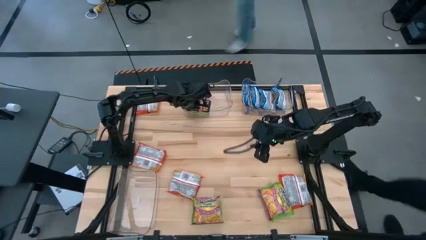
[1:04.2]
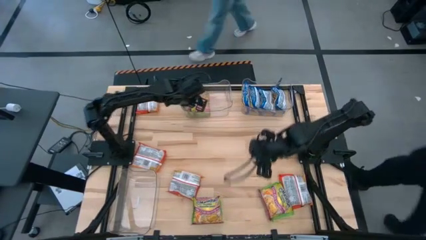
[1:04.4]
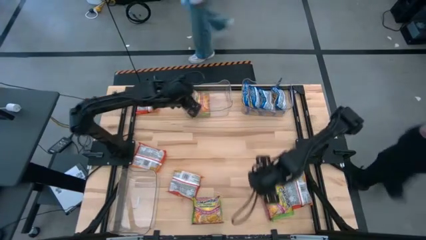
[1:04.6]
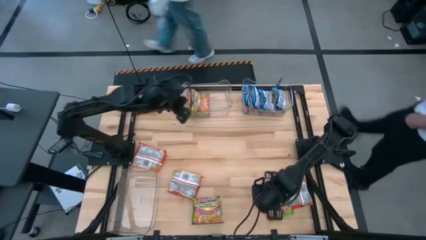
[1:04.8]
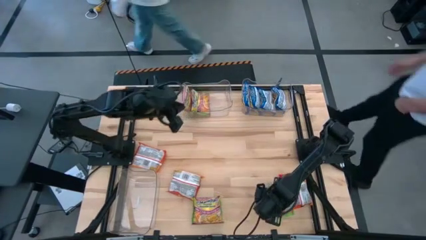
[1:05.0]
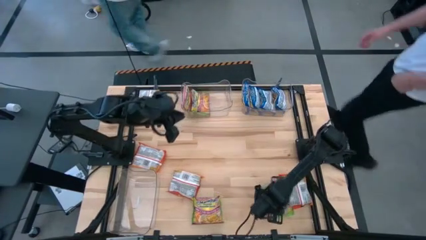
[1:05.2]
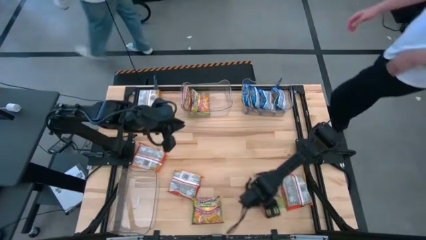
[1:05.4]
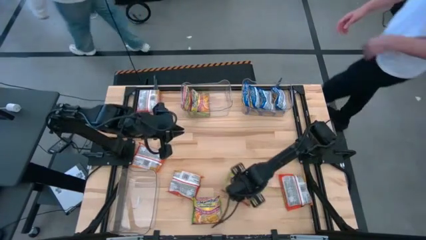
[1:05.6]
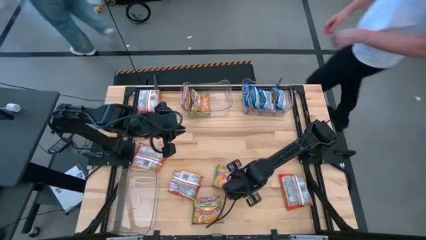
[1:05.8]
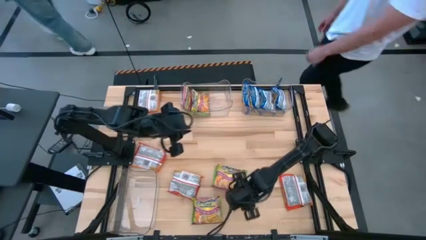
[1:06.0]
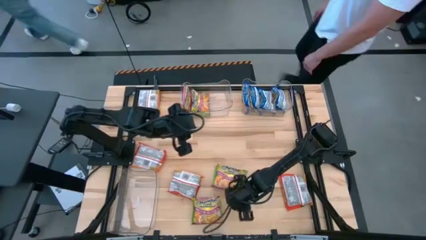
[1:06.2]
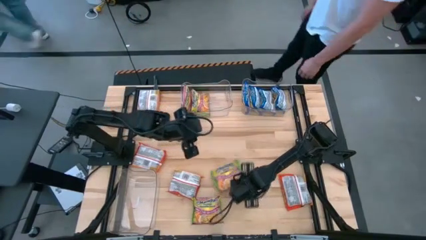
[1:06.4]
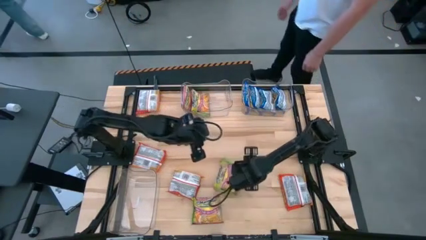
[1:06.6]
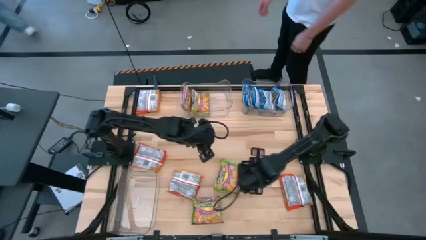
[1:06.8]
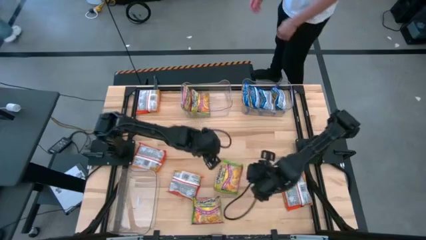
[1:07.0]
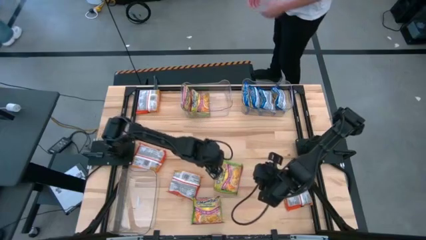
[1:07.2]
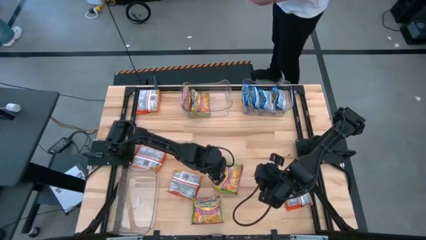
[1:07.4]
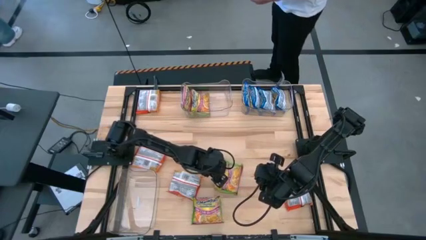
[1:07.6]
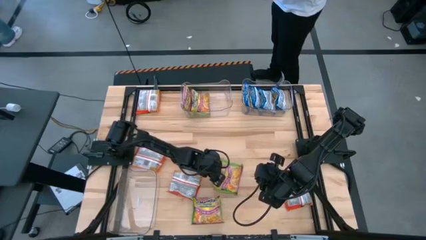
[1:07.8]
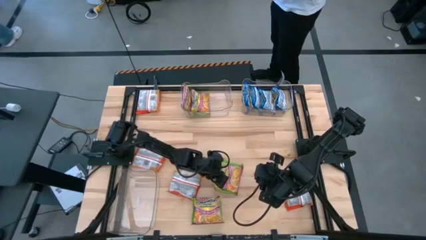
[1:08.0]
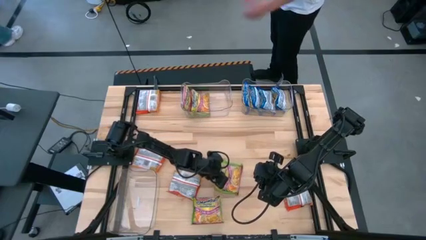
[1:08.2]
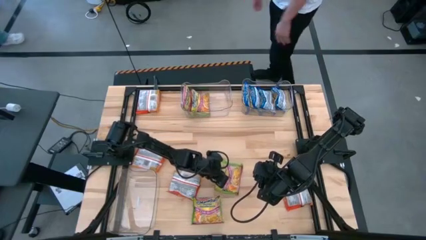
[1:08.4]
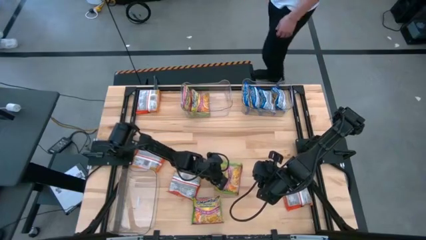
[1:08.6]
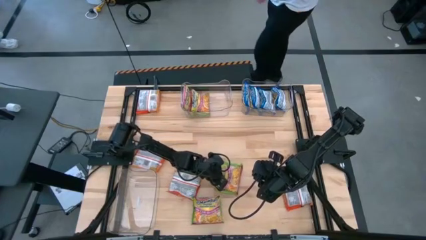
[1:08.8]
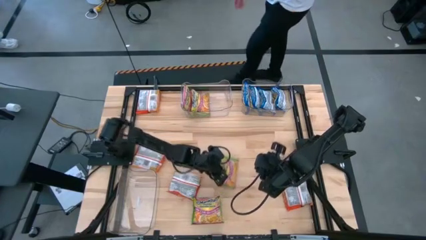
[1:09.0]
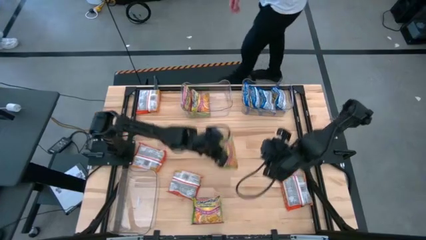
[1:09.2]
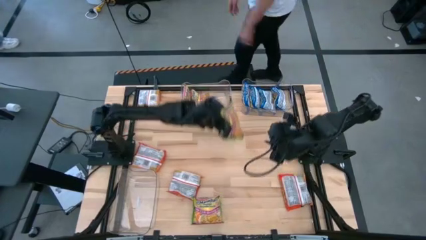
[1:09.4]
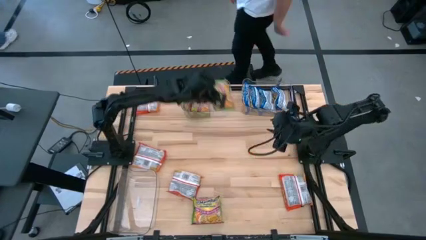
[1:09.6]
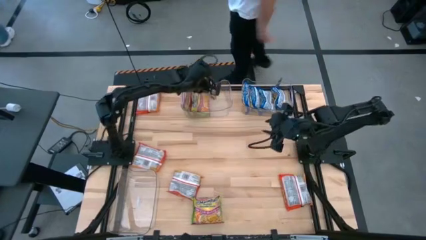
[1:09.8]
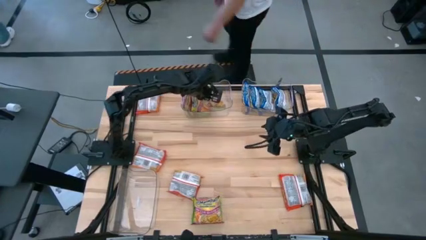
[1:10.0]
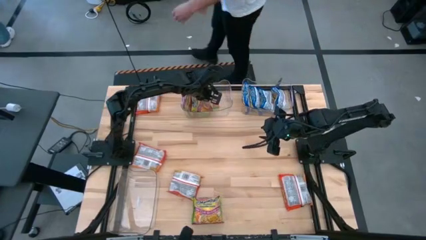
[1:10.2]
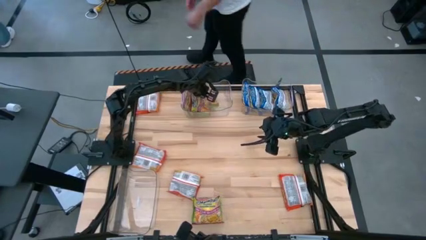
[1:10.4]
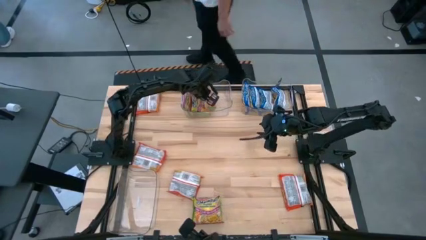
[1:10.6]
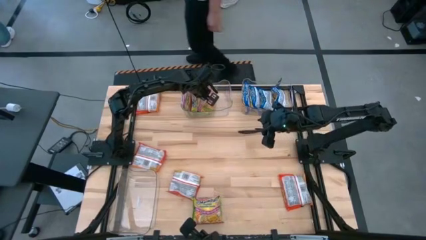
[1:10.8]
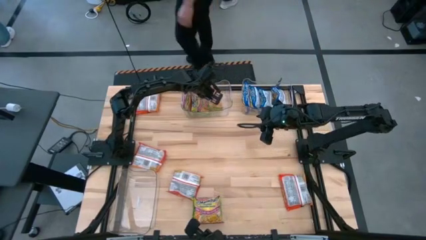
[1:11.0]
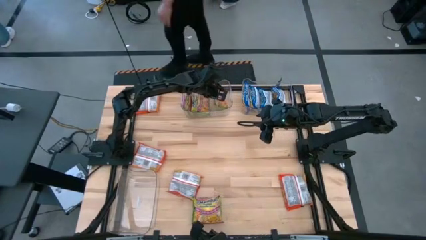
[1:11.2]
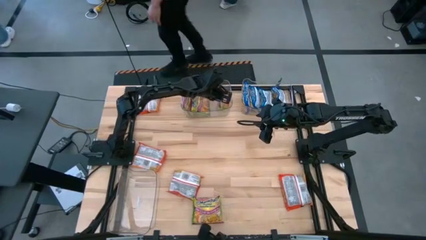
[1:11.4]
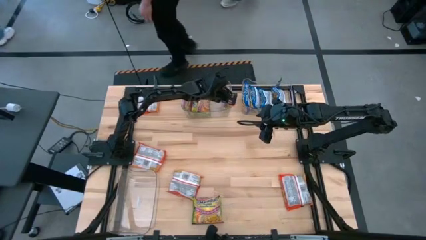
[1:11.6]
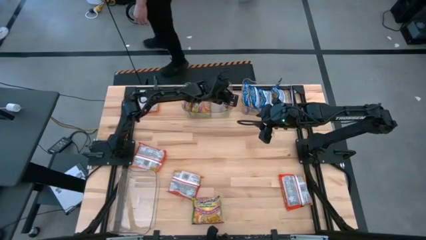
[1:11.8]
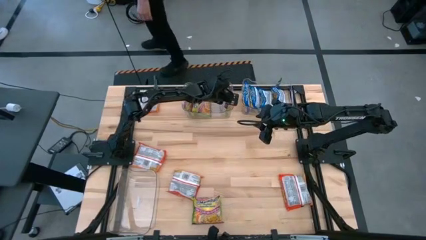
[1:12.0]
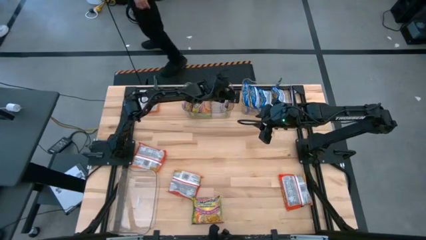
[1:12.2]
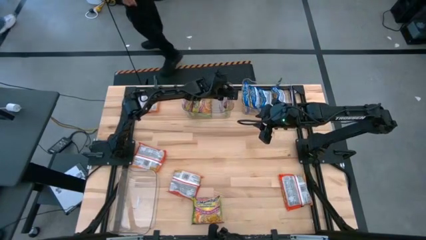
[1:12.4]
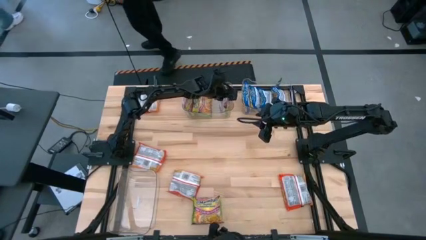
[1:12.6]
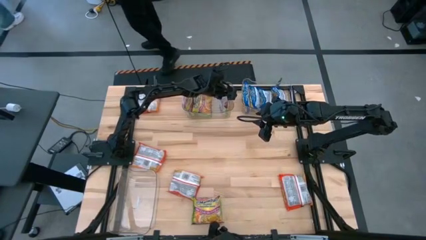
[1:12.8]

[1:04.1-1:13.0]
Task: Sort Maruchan noodles
Put the green noodle pack into the top left transparent bin

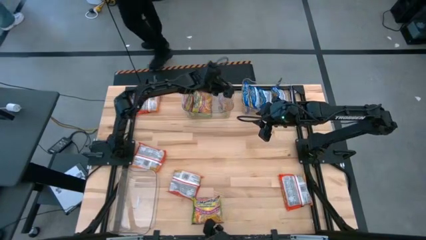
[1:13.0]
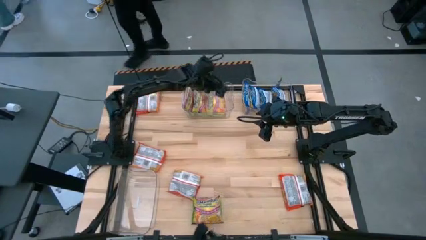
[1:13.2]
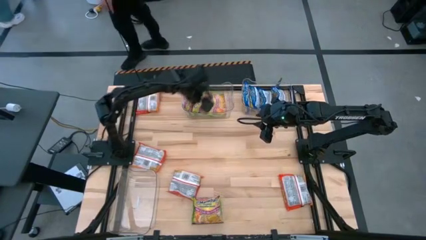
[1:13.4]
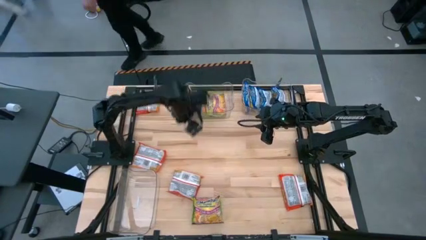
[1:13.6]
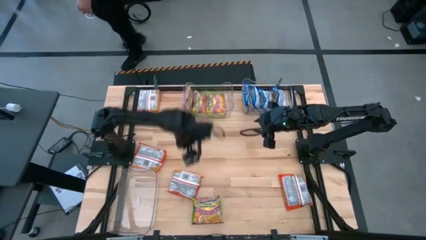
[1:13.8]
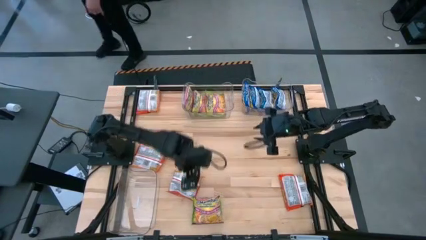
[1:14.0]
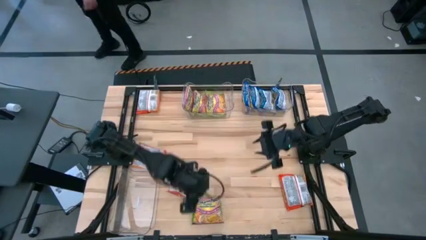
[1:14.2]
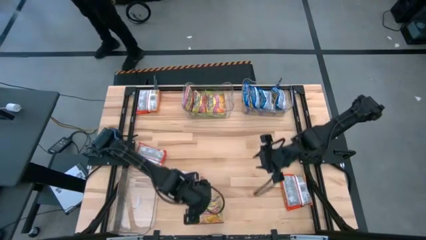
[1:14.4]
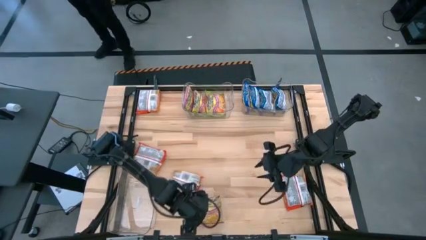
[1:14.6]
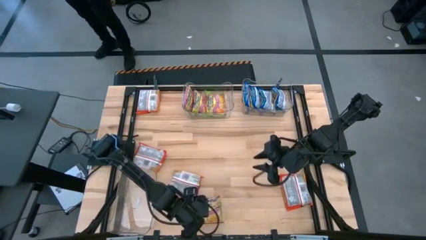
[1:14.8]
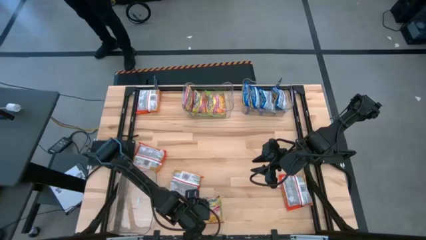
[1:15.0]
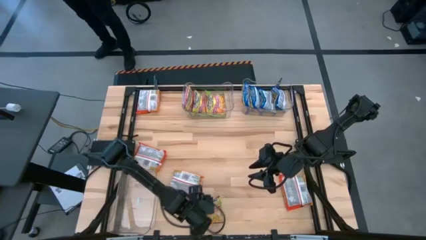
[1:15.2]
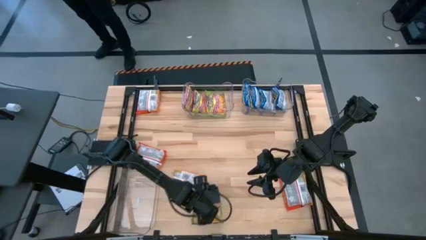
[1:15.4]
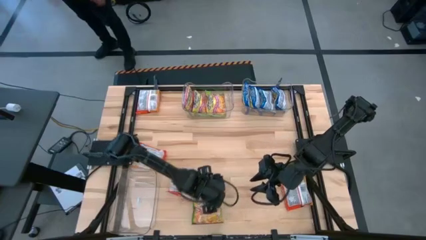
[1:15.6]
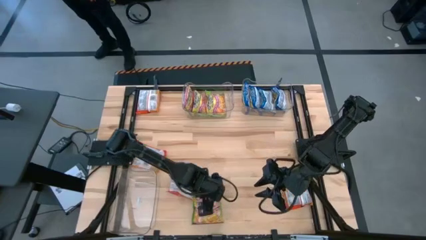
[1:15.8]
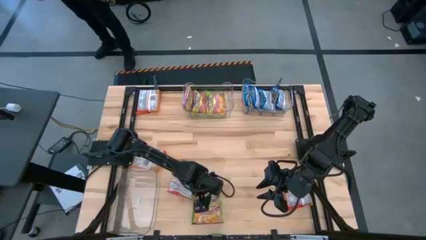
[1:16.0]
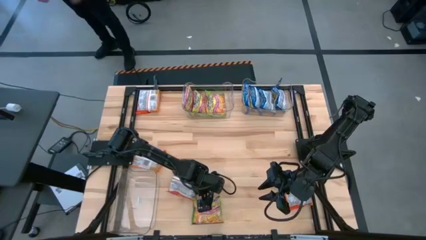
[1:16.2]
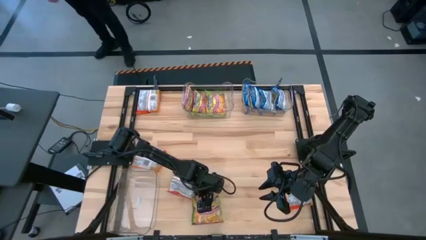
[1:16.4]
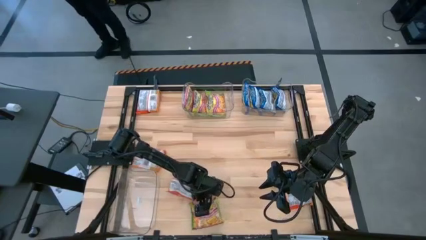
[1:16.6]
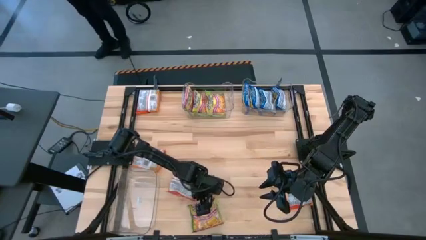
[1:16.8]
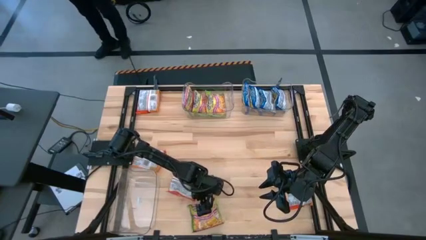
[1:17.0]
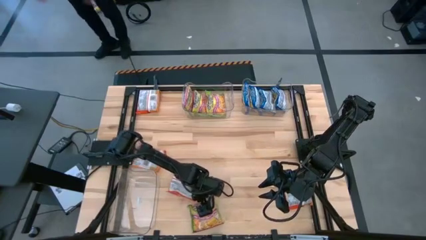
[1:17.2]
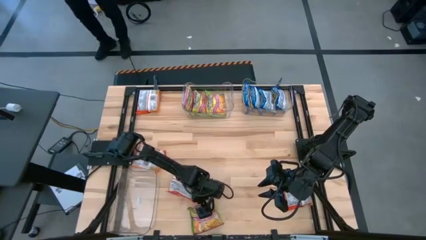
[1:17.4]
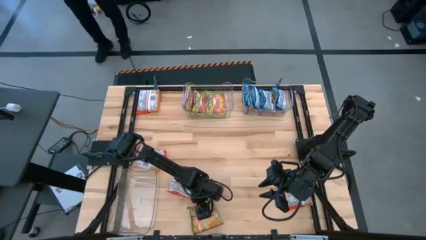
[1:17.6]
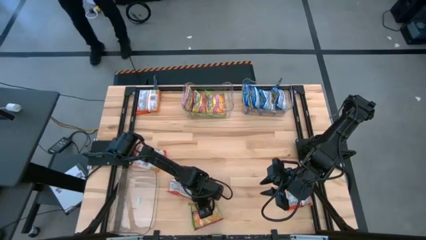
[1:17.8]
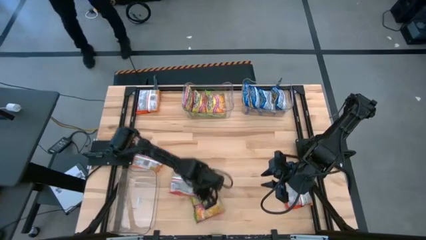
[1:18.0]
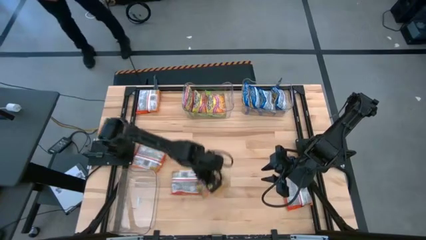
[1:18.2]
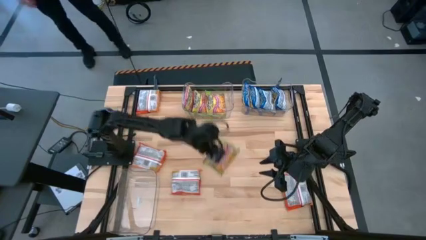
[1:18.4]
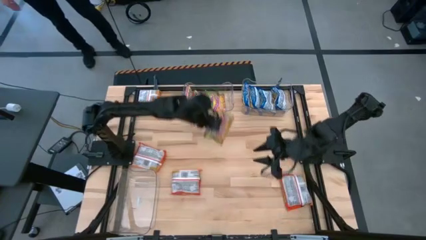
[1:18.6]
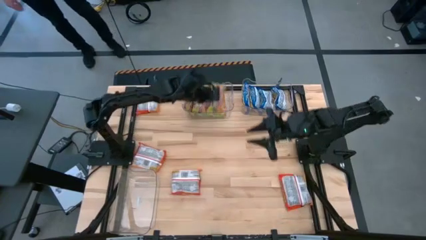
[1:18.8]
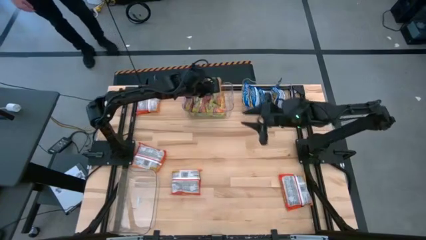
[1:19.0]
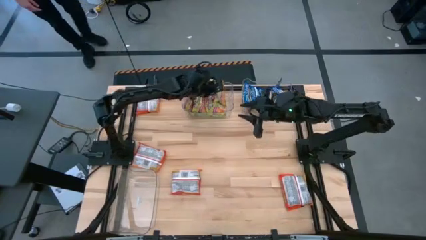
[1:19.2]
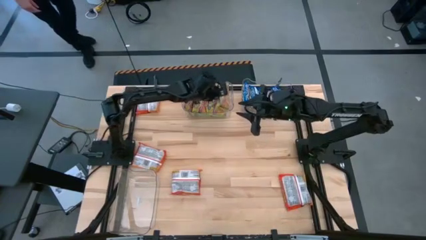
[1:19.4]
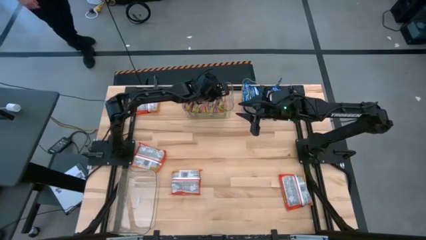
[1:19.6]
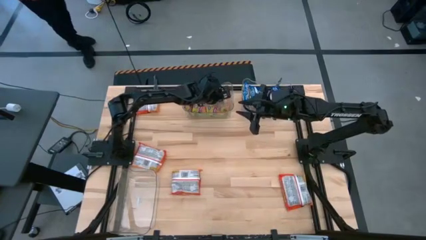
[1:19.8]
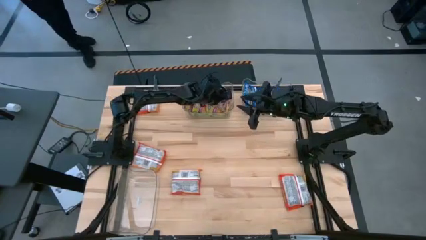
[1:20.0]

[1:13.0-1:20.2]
Put the green noodle pack into the top left transparent bin
